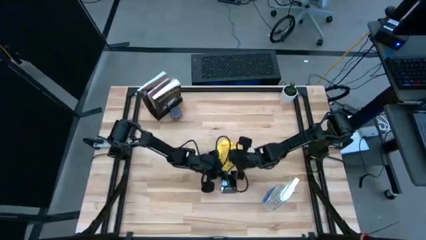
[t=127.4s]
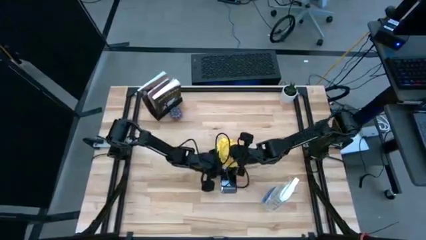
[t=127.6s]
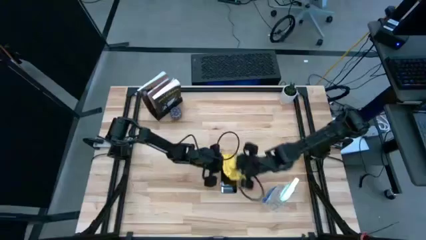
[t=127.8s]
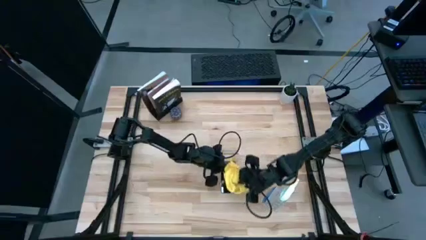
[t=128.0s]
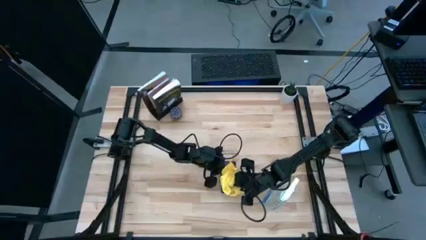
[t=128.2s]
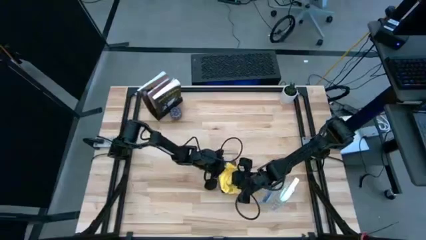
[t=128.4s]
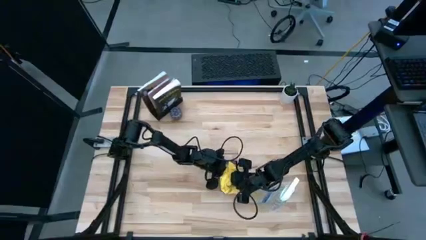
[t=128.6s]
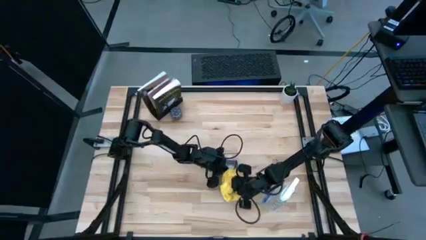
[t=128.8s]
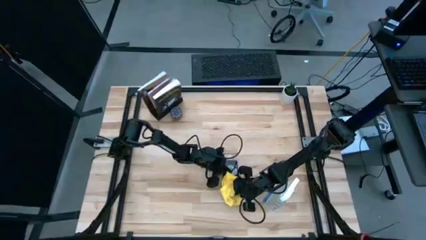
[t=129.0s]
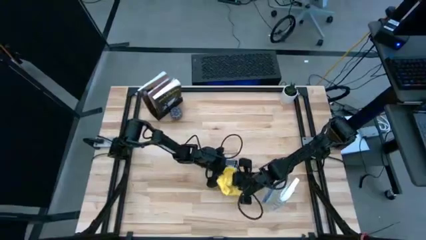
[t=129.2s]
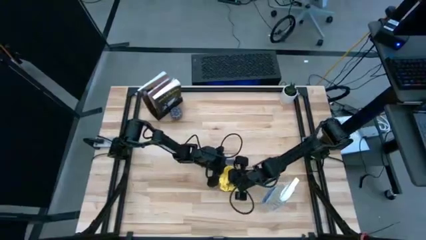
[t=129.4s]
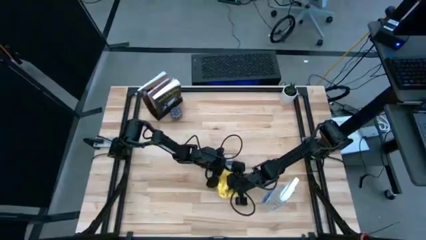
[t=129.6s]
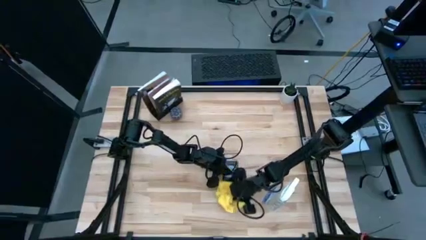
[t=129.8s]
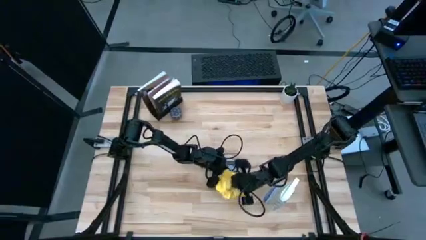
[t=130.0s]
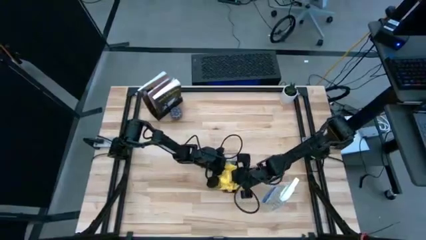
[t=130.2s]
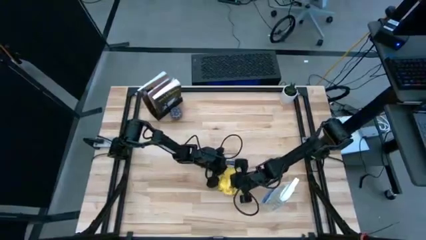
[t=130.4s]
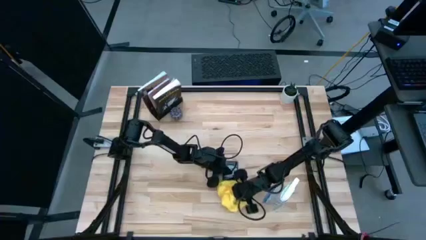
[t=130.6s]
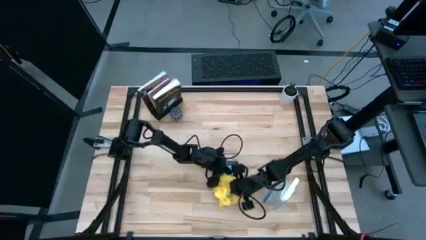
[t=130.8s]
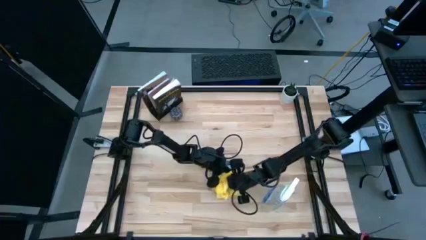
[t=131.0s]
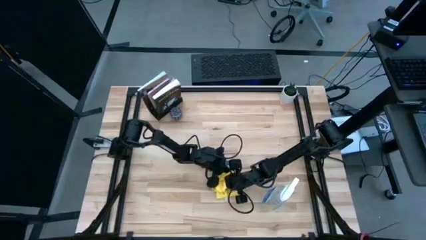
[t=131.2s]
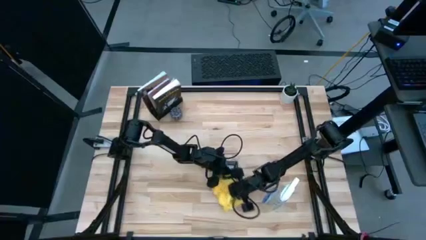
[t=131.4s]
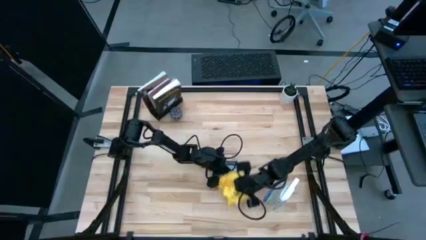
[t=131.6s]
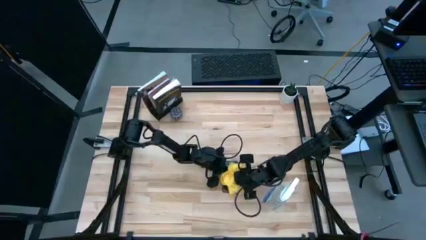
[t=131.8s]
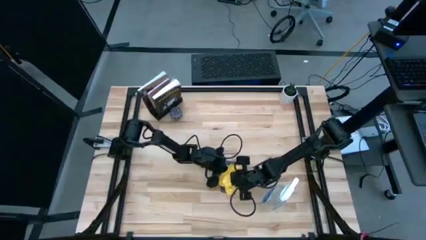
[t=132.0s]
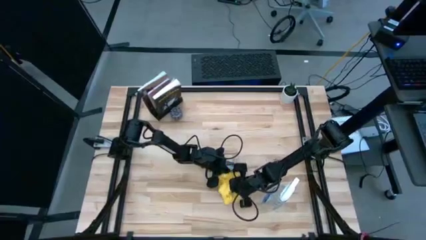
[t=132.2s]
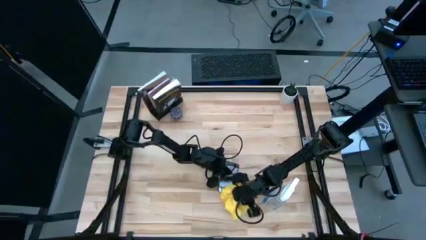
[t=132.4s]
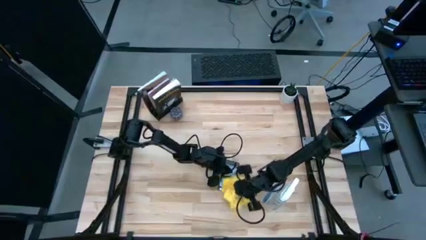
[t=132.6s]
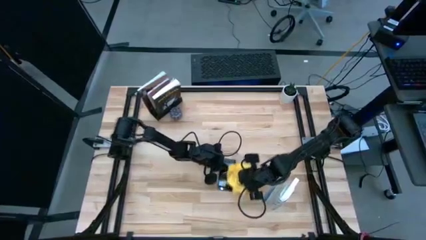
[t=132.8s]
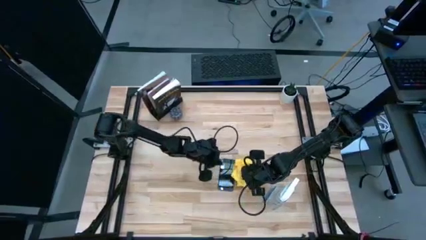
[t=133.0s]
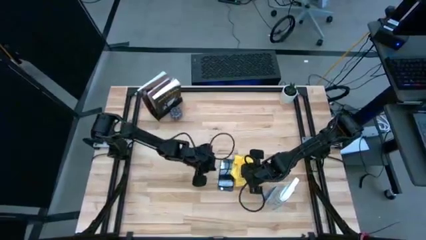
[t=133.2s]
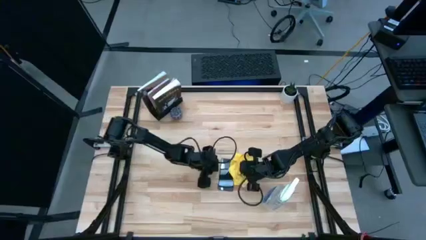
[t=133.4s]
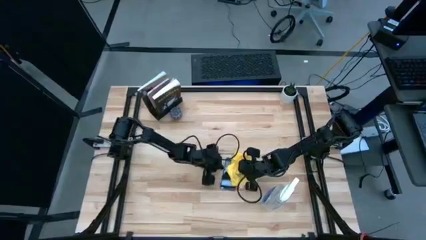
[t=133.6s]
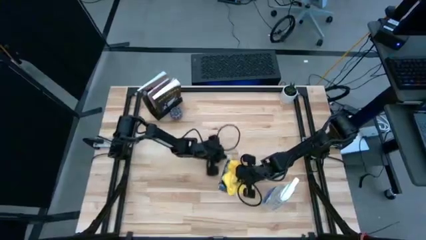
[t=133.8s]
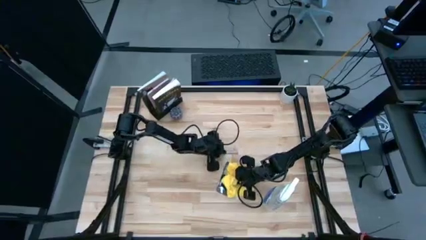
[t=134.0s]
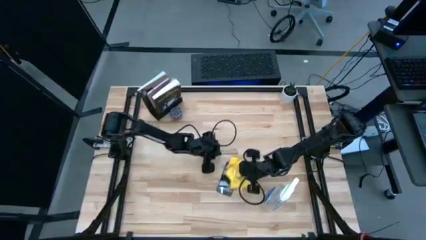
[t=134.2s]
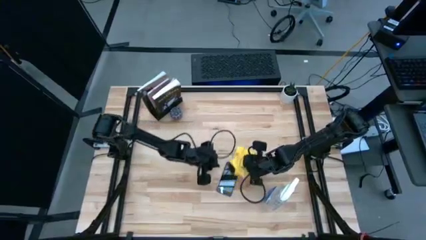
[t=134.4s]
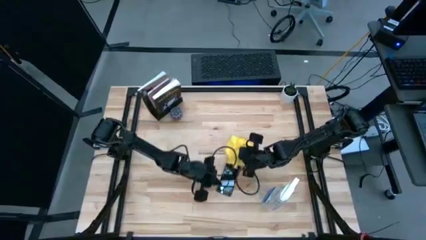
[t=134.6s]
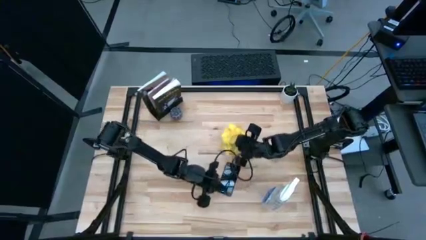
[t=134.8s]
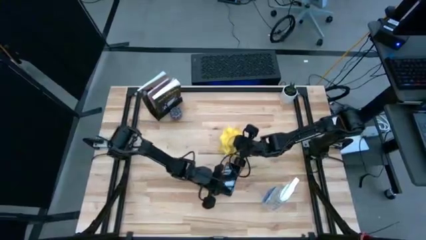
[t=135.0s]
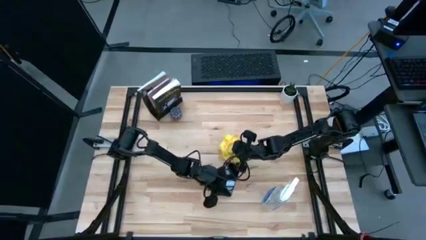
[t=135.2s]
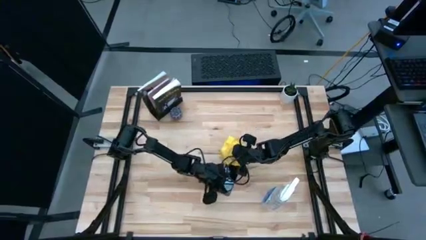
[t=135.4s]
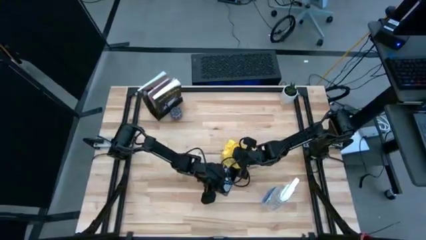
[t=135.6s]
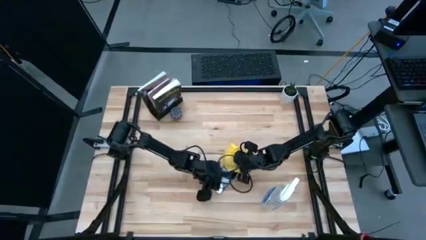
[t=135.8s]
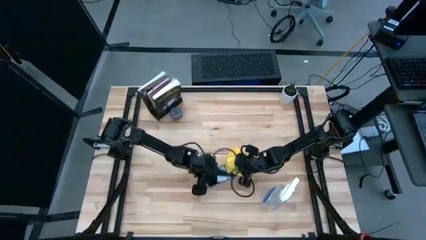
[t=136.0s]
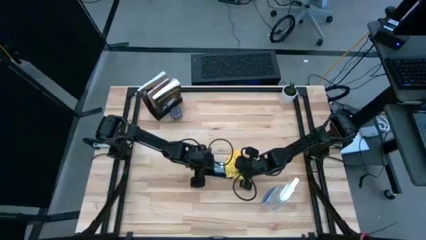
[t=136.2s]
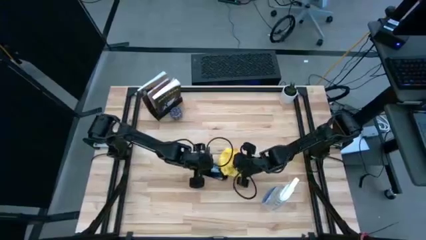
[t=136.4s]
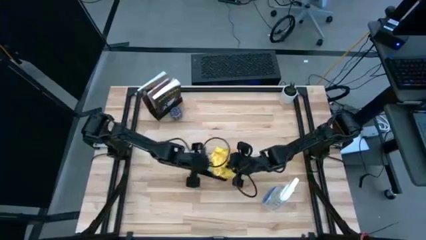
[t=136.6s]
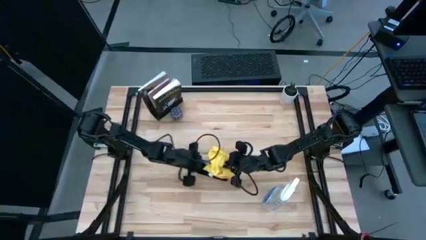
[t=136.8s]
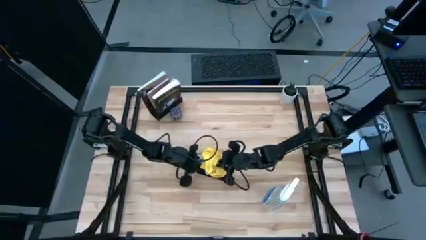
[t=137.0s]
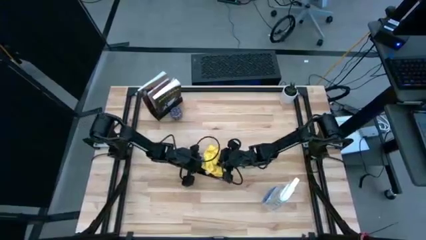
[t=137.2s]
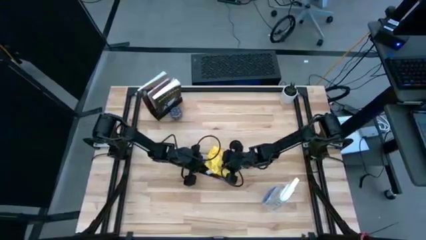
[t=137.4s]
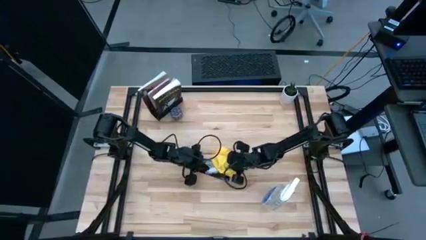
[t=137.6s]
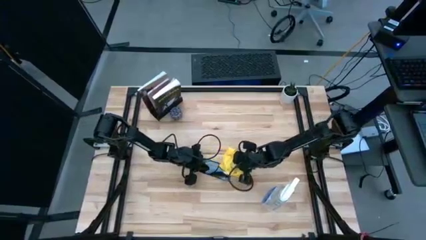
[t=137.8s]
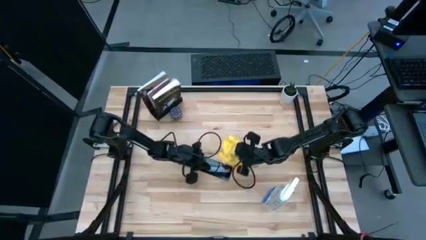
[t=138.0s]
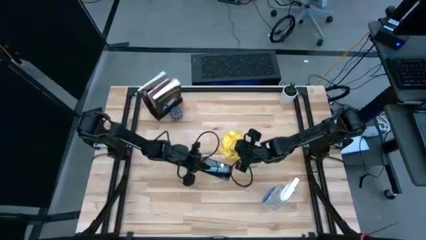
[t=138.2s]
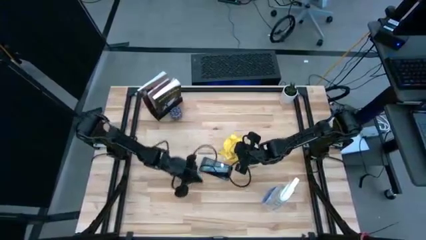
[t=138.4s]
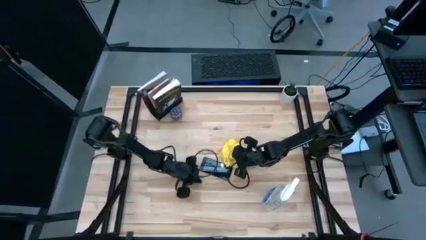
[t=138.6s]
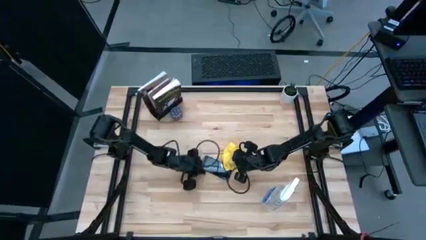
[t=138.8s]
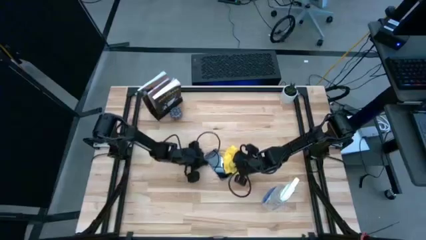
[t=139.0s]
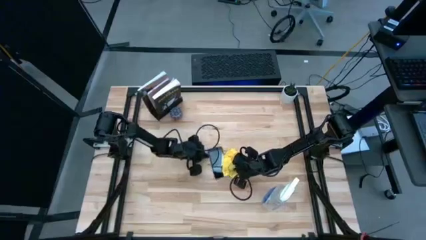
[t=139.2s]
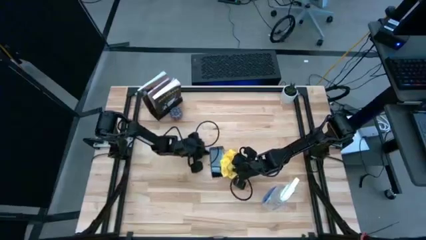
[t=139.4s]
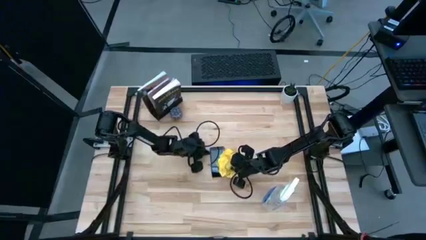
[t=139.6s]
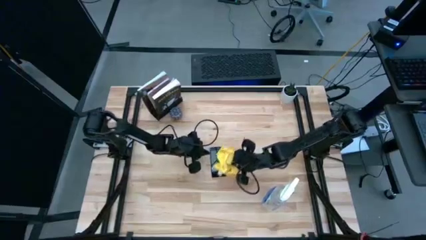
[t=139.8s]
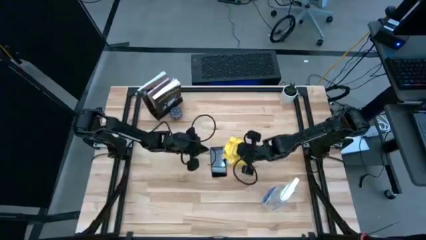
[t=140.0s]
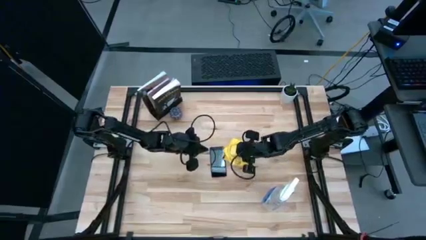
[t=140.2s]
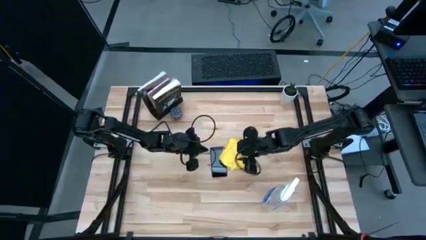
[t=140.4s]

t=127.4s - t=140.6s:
Task: Apply microfiber cloth
Wipe the front of the pink cellphone with a yellow microfiber cloth

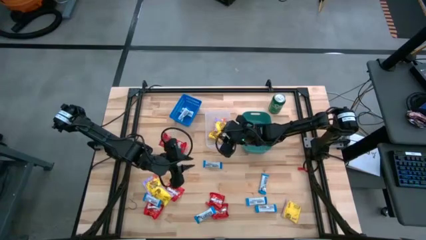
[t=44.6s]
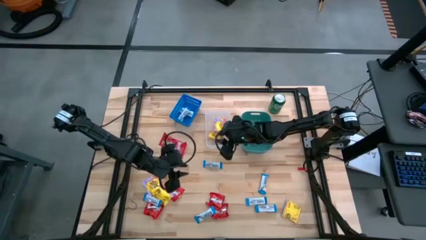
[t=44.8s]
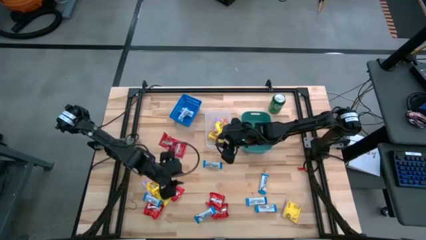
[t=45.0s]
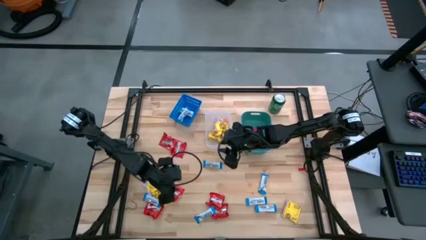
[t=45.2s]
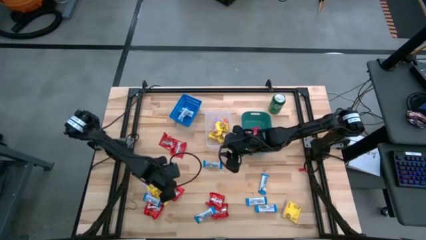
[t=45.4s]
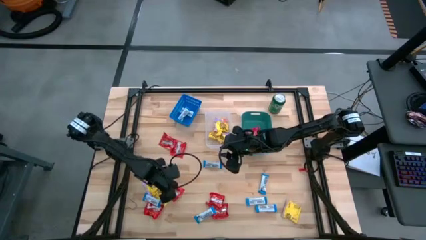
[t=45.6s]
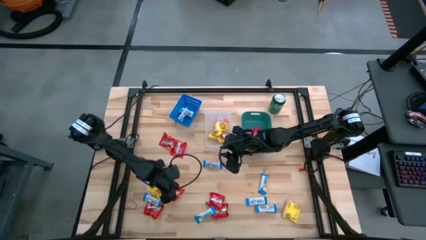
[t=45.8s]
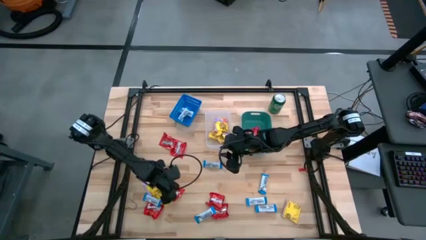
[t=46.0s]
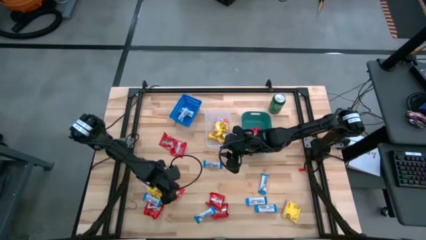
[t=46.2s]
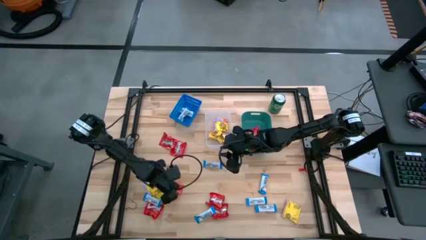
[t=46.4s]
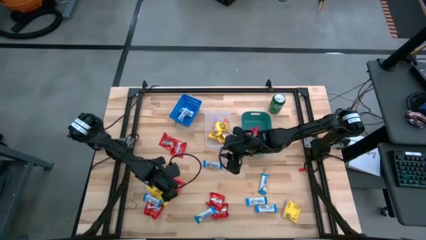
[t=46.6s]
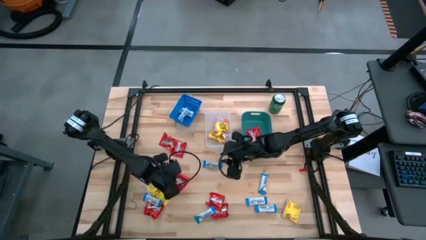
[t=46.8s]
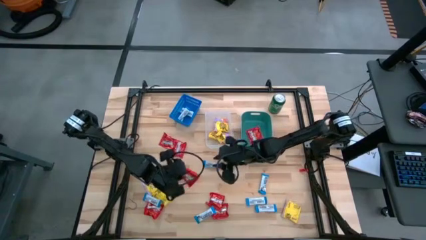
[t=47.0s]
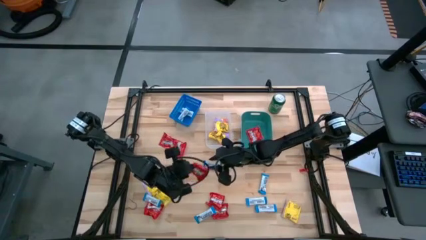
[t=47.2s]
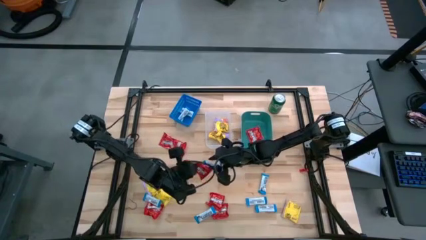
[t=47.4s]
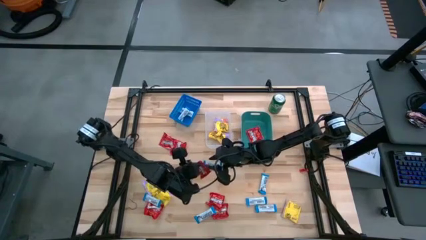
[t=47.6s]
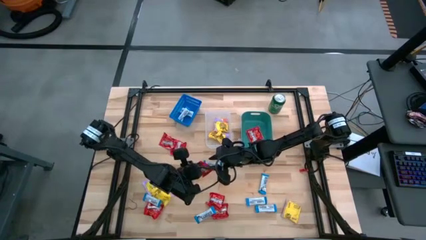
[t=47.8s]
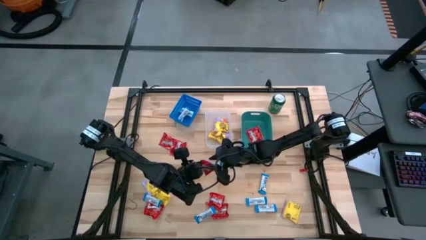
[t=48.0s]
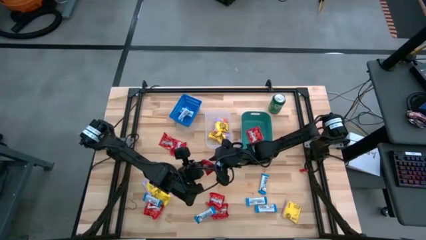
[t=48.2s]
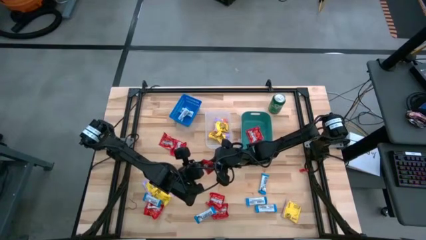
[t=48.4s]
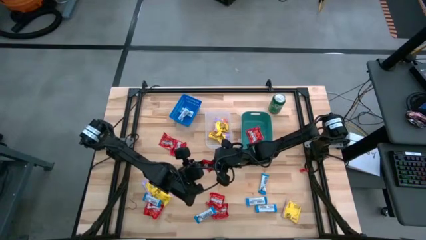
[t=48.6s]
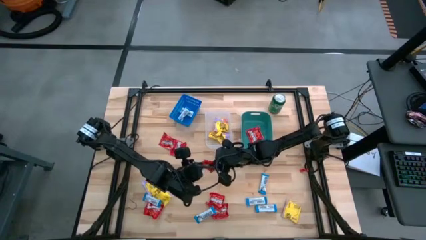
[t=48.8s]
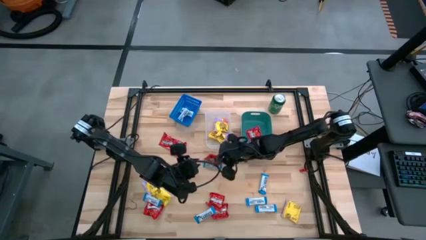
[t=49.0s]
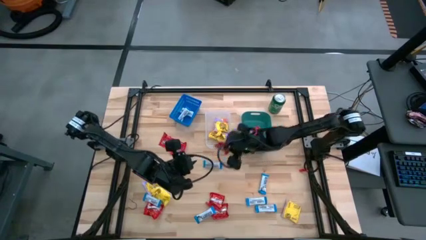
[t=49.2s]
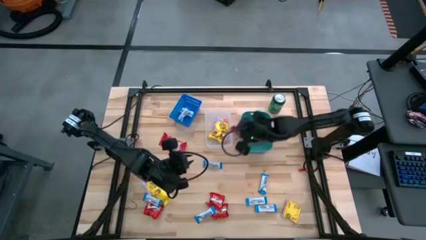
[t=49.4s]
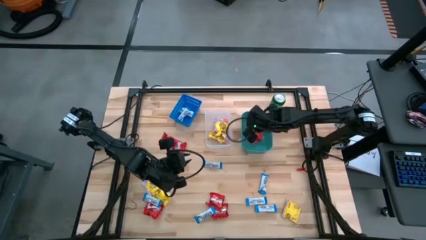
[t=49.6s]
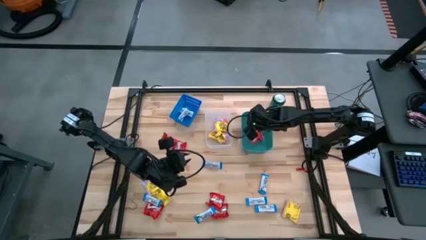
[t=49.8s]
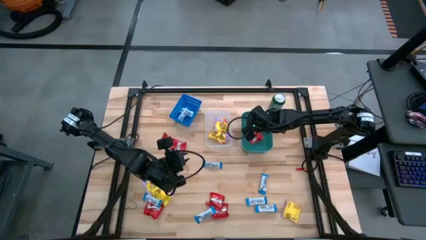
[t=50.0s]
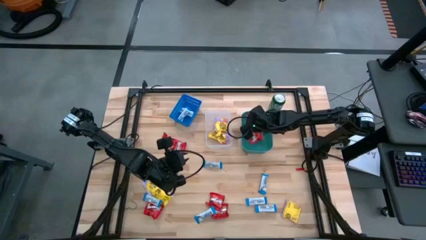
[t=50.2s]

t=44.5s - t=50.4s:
Task: Sort candy
Put the red candy into the green bin
